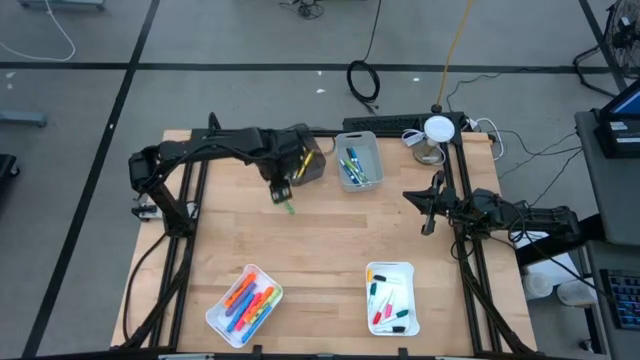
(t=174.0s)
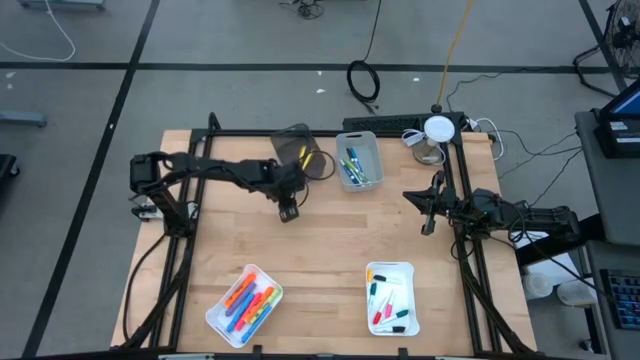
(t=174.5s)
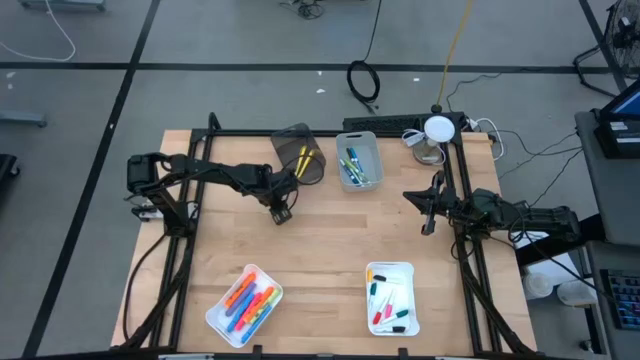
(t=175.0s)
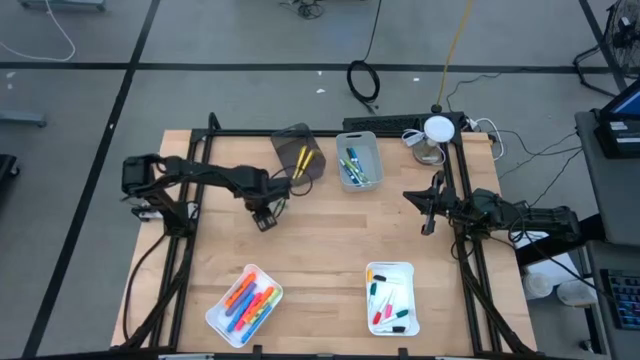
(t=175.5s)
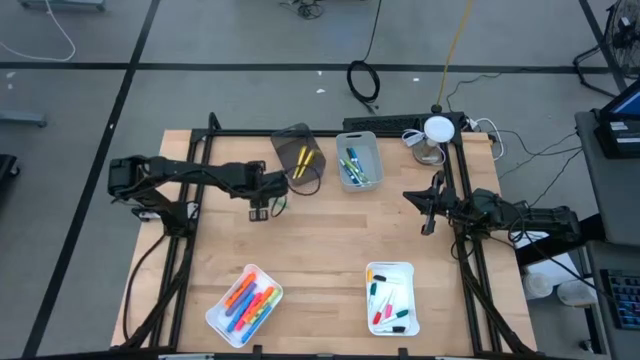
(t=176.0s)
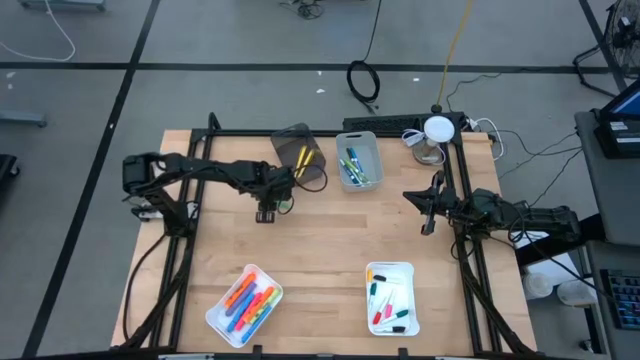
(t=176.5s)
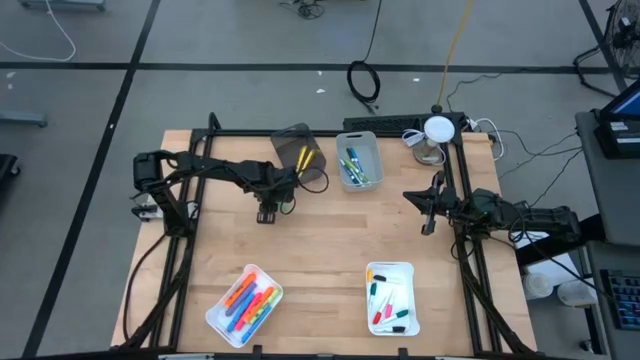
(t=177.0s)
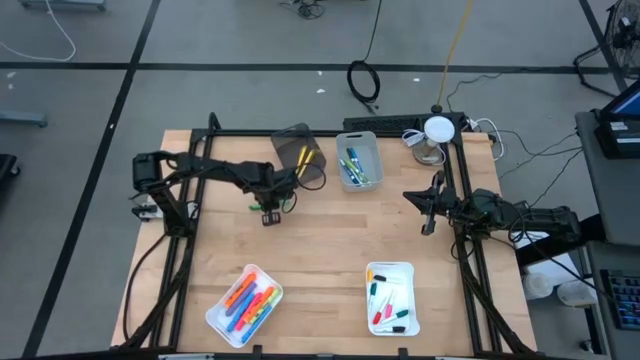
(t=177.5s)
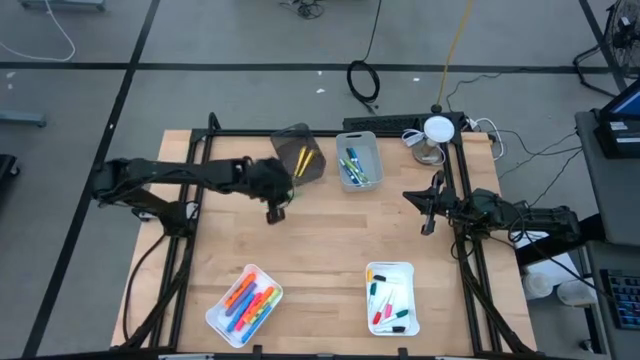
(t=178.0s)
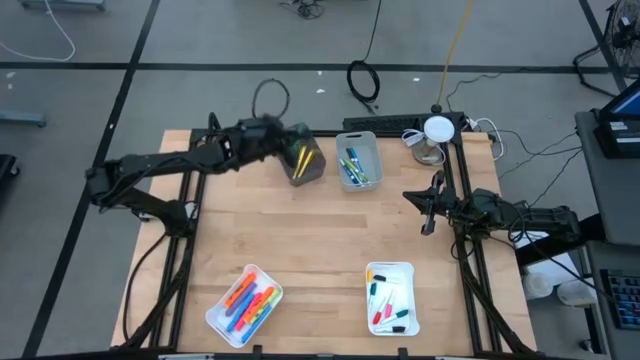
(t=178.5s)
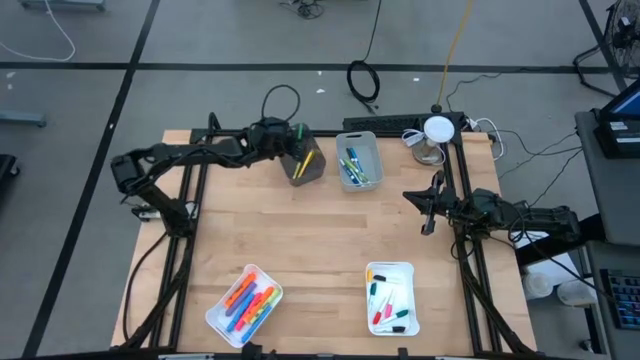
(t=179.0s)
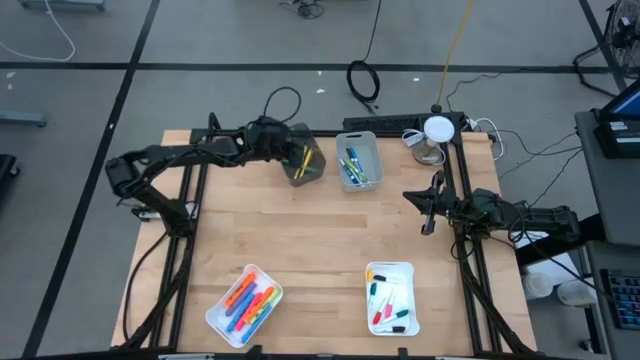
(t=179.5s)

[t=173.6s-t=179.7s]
Task: Pick & Place Markers
Put the green pen into the black bin

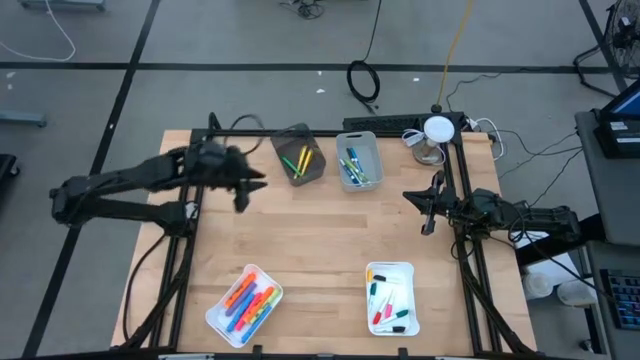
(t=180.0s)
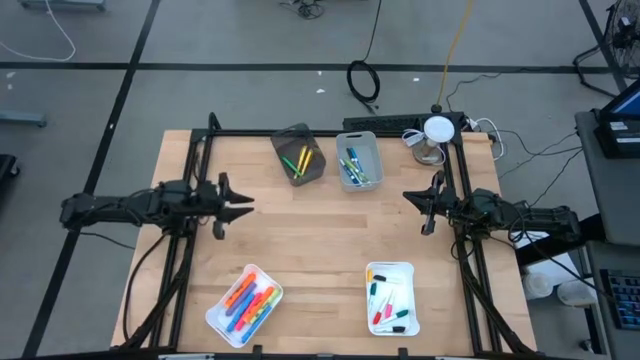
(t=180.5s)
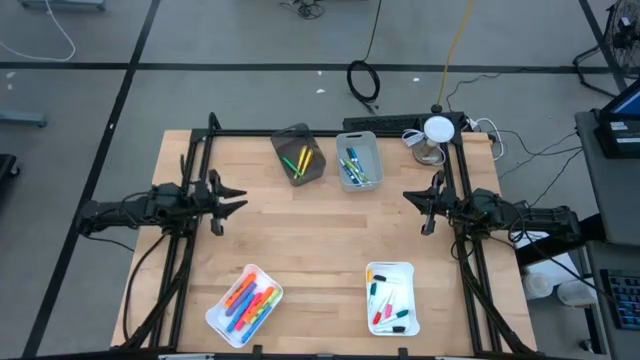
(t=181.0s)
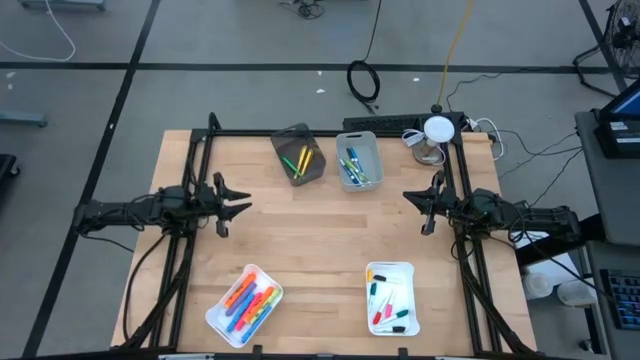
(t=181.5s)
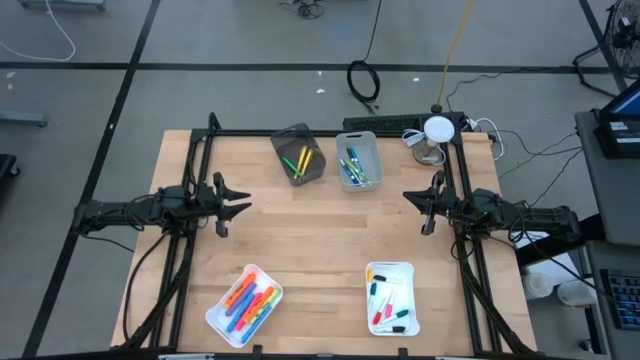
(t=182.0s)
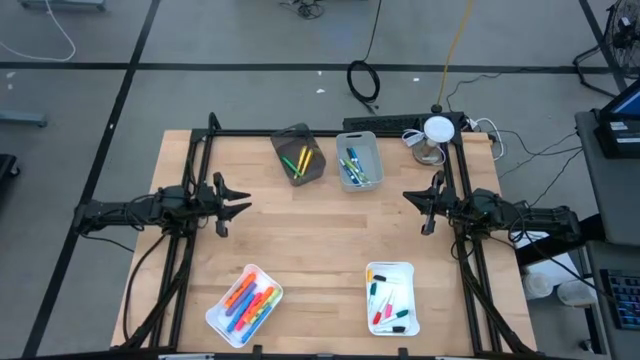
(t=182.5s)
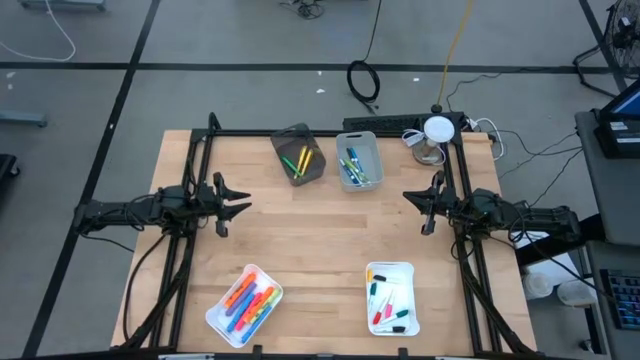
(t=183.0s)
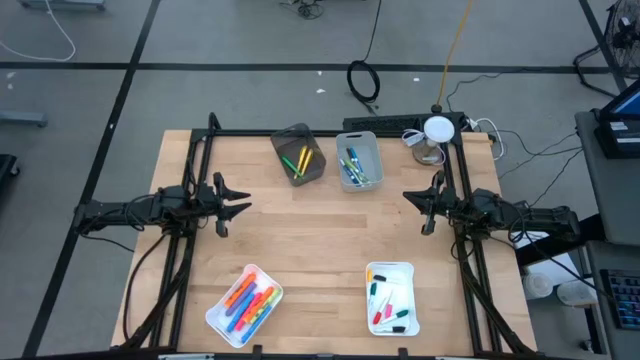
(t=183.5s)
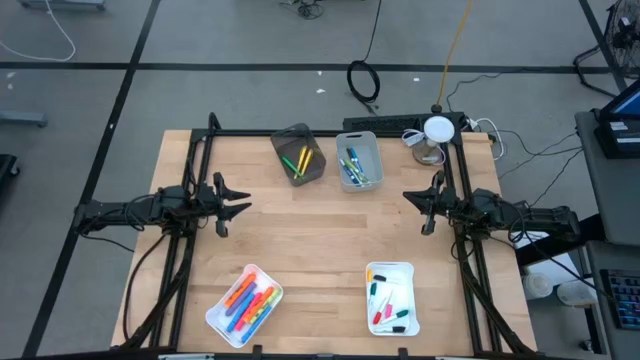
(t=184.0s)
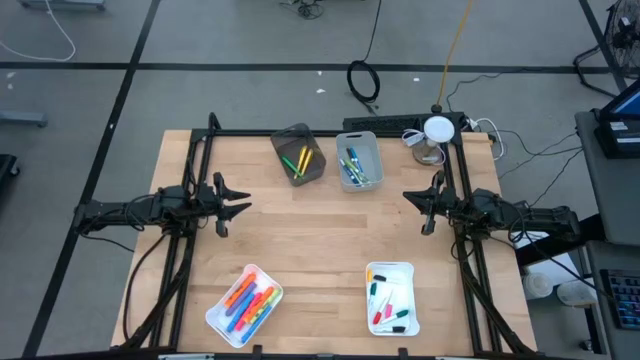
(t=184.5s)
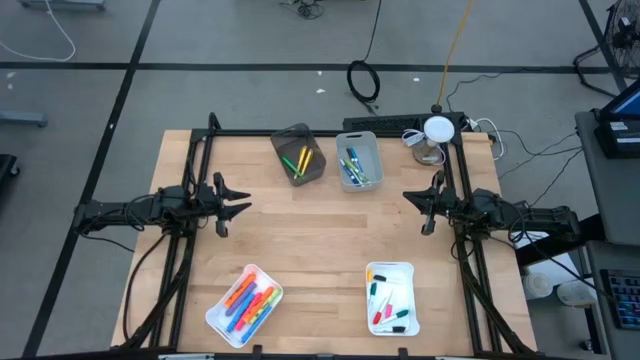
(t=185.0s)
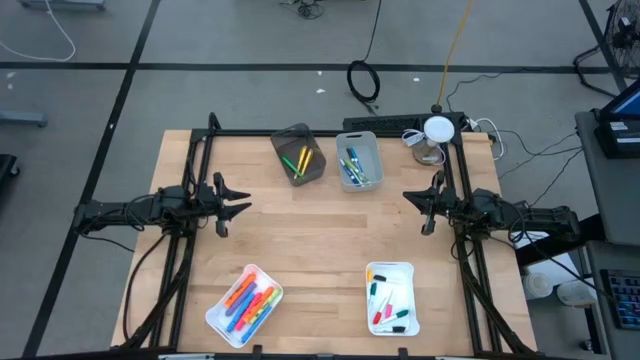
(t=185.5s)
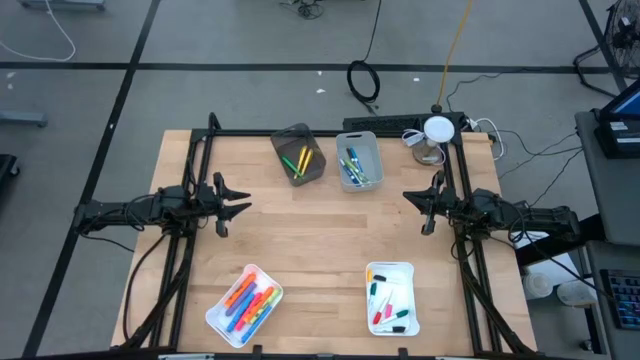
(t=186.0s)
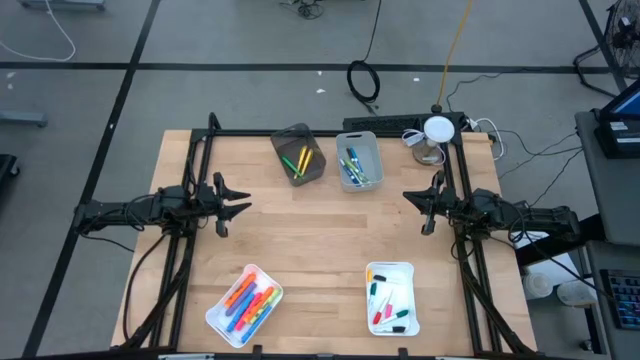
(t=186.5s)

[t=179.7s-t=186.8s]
Return to Home Position

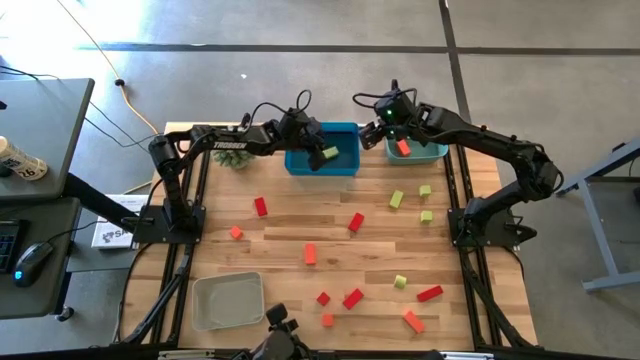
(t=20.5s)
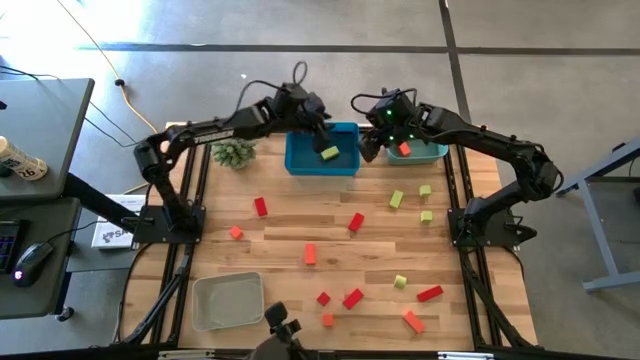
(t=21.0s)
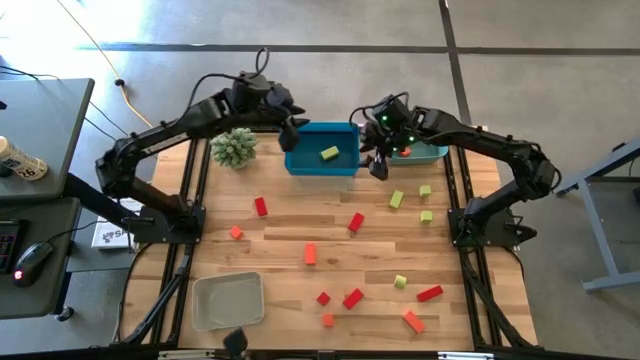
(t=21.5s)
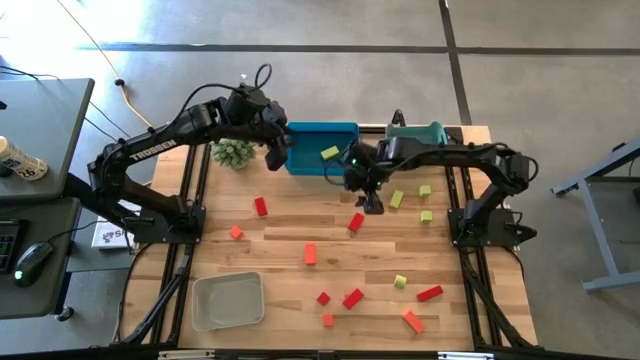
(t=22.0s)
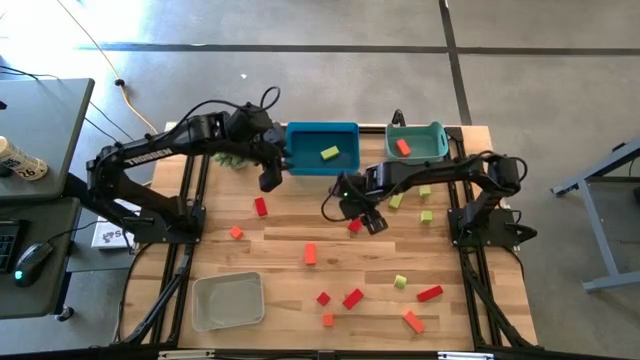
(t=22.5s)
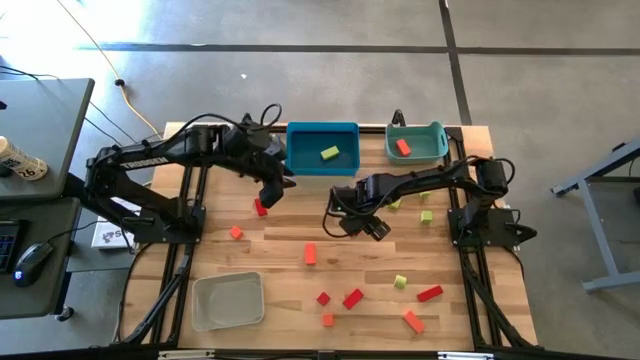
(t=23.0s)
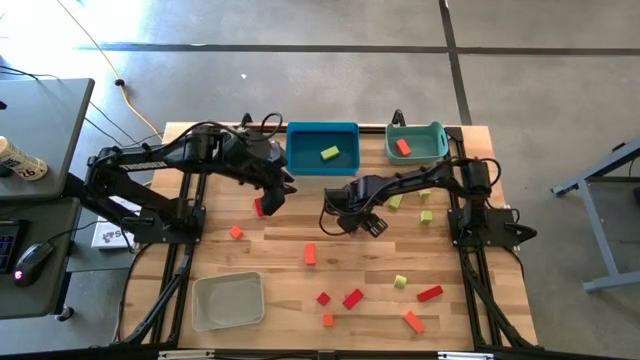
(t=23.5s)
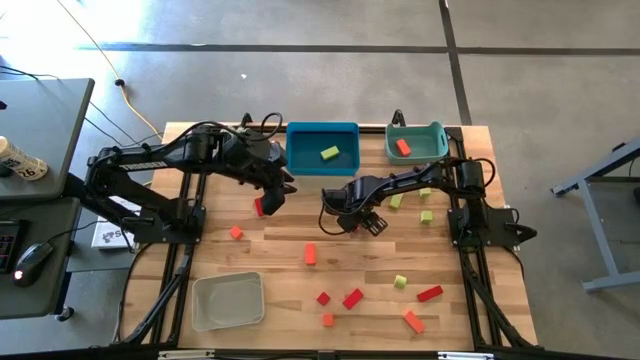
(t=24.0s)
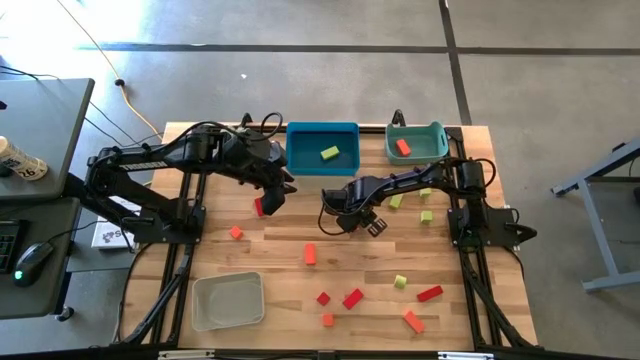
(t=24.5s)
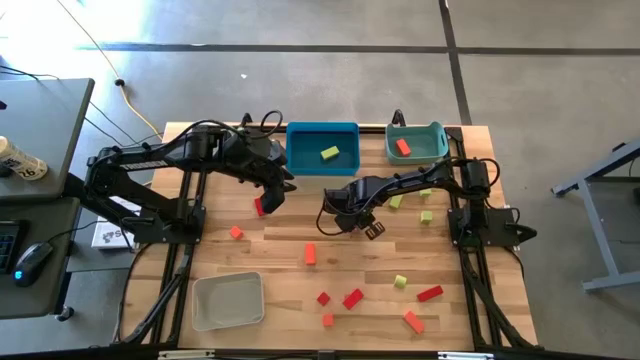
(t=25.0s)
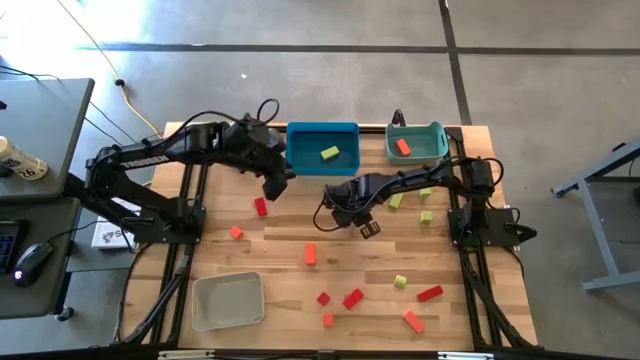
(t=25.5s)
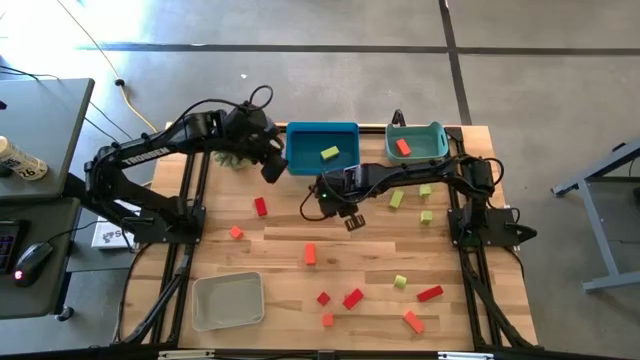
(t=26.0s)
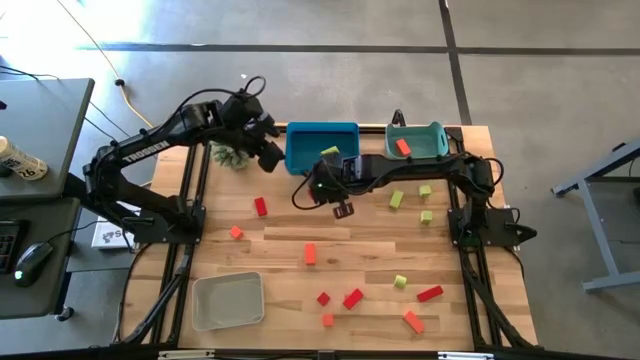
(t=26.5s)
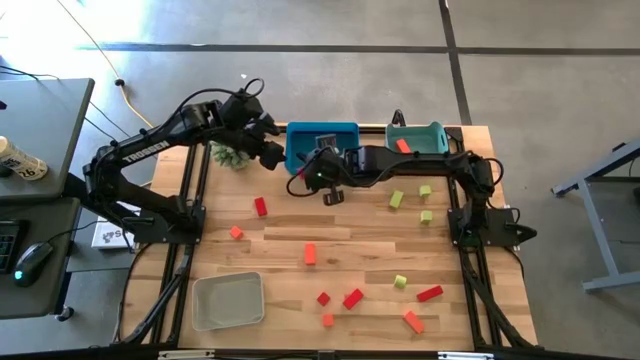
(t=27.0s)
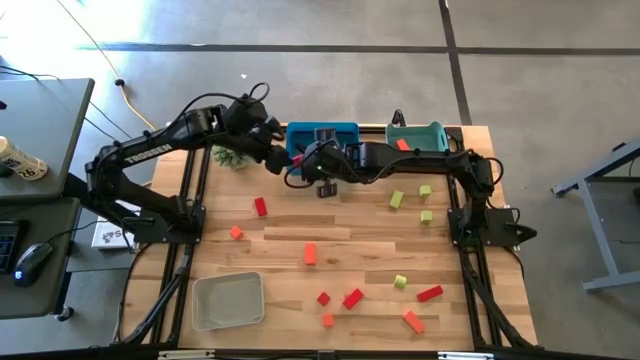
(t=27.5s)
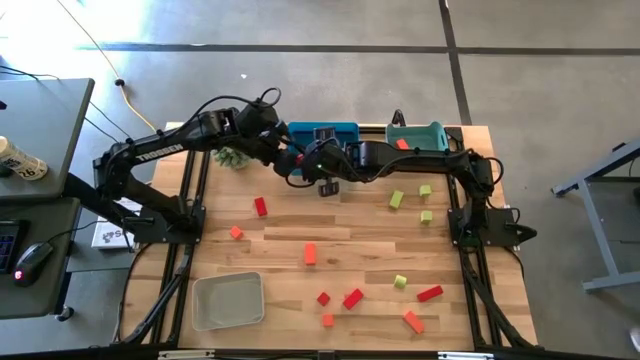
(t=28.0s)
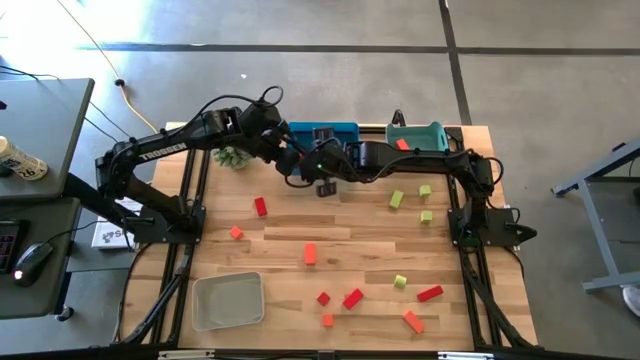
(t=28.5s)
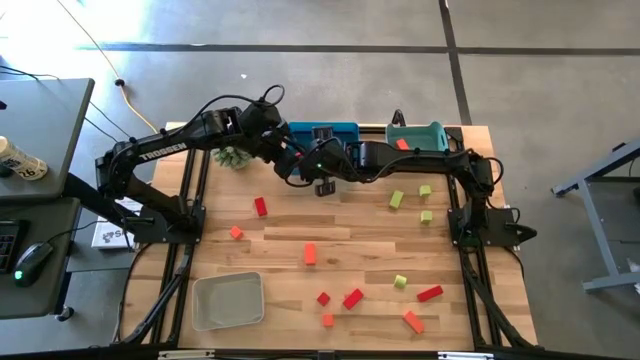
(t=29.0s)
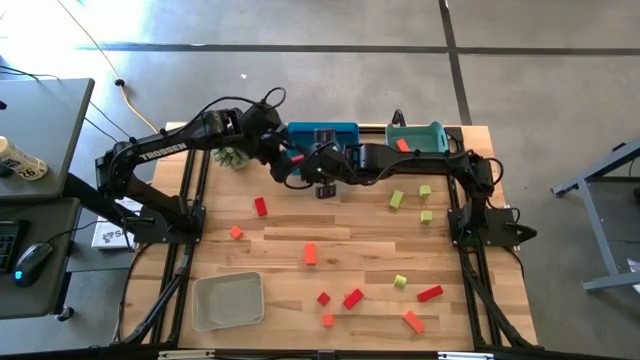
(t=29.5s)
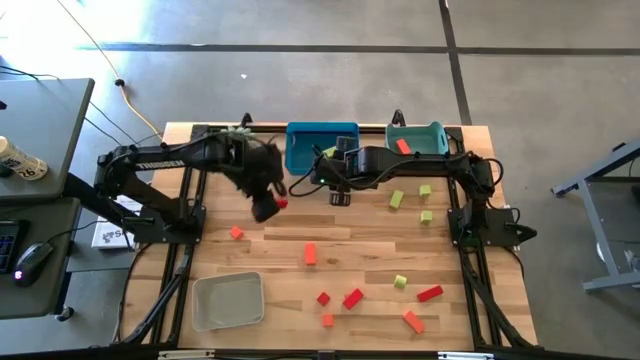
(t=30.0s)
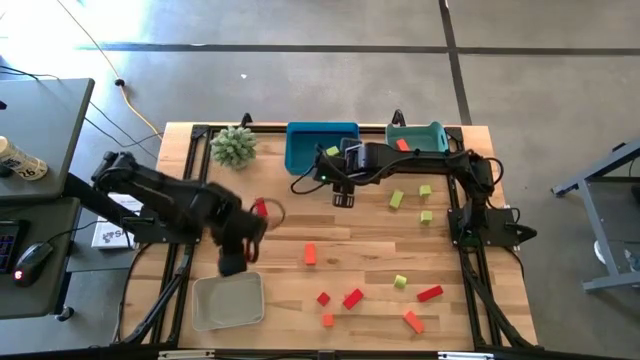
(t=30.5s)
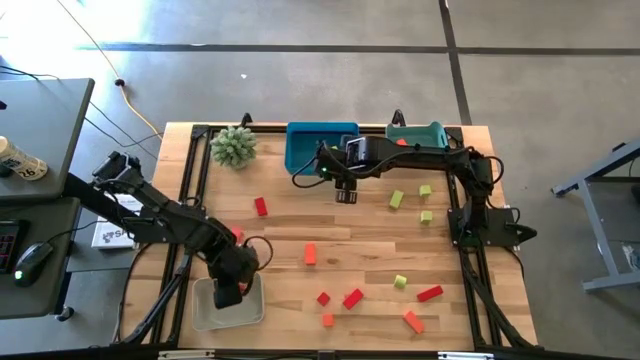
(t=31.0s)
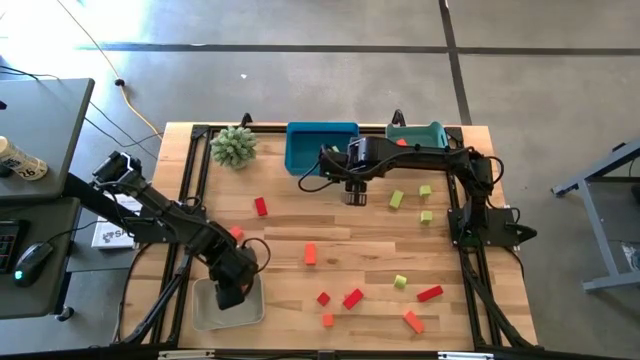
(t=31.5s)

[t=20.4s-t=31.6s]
Task: Sort & place blocks by color
Put the red block into the gray bin
